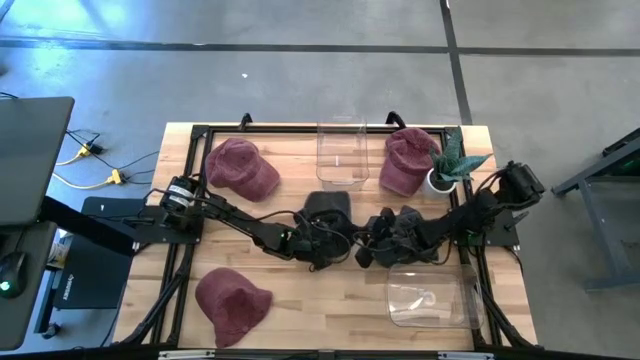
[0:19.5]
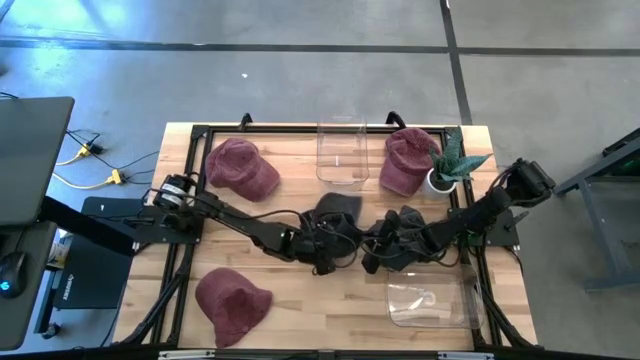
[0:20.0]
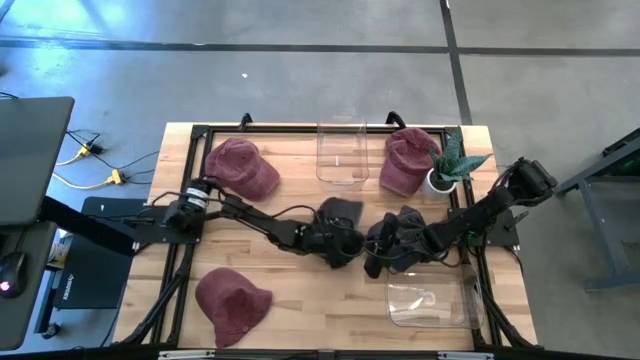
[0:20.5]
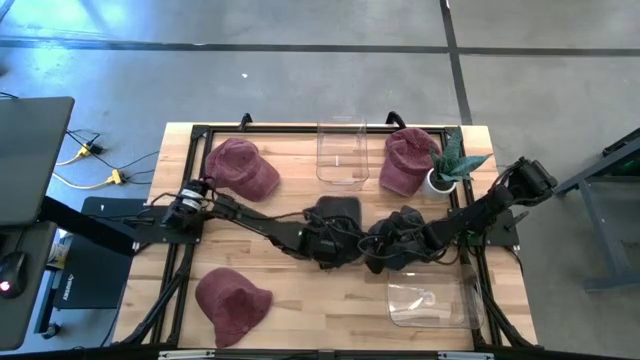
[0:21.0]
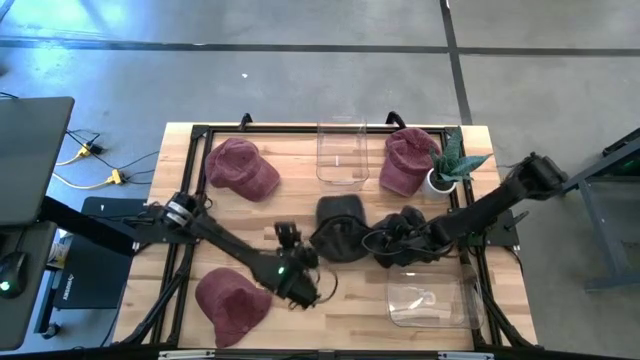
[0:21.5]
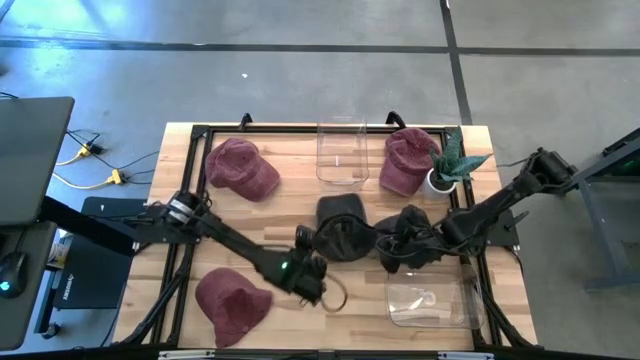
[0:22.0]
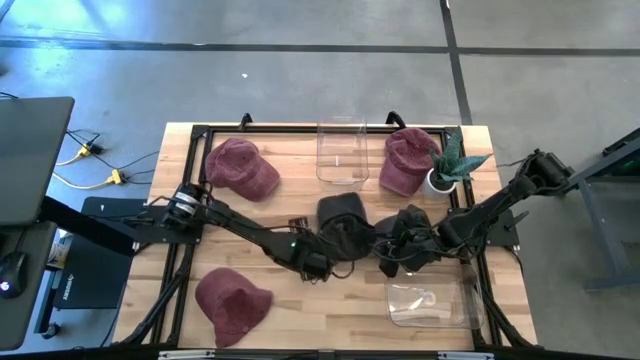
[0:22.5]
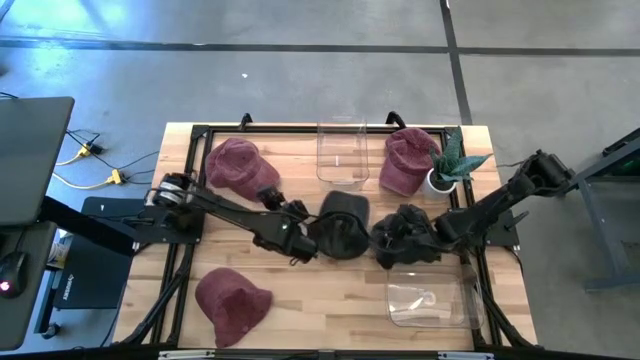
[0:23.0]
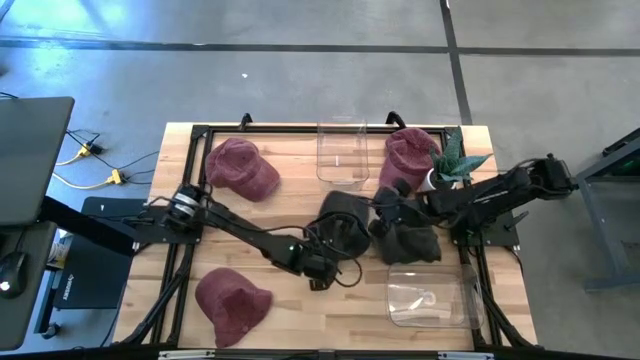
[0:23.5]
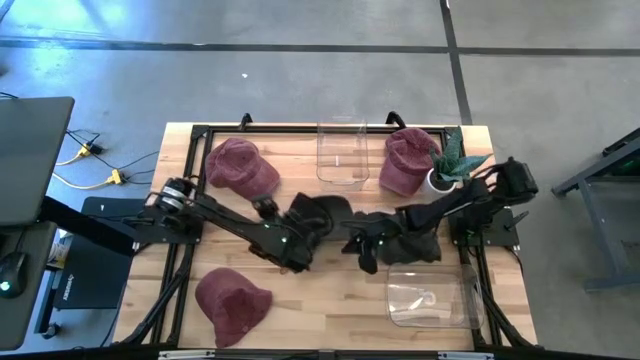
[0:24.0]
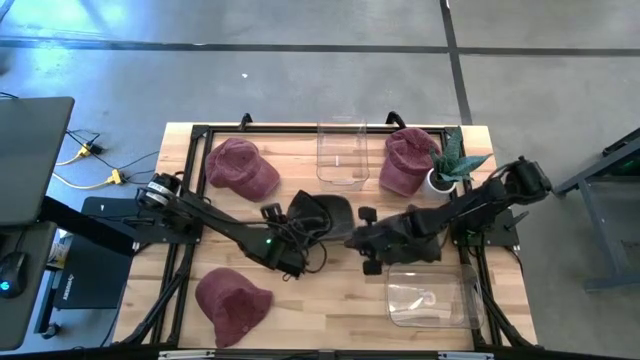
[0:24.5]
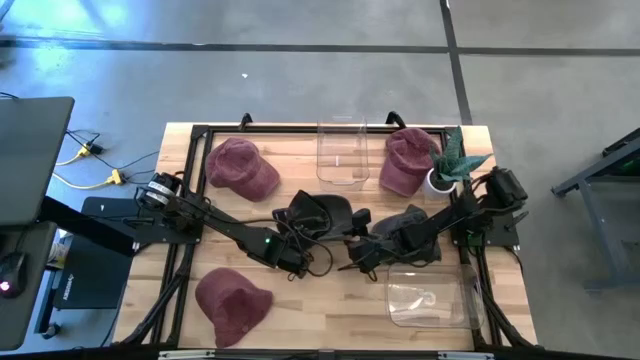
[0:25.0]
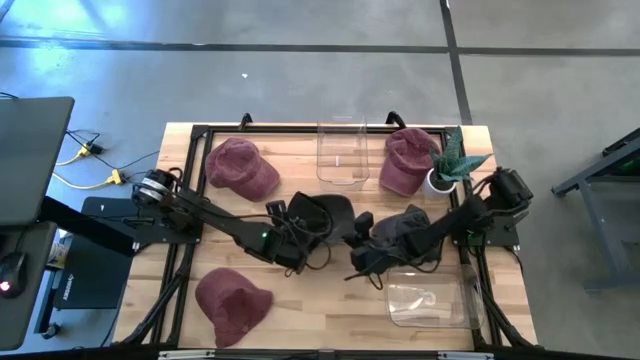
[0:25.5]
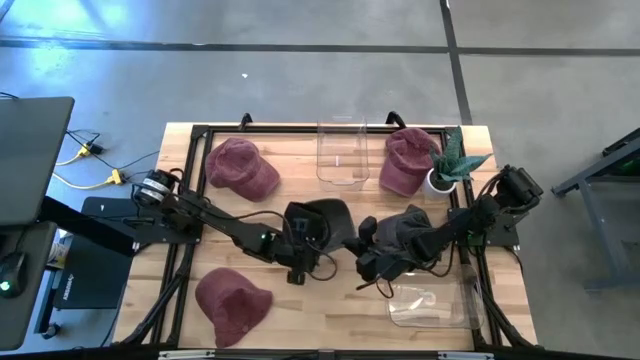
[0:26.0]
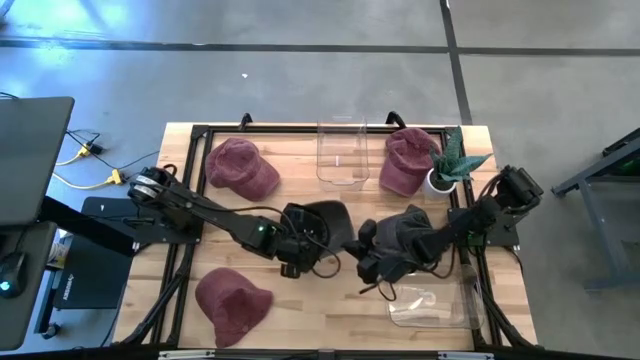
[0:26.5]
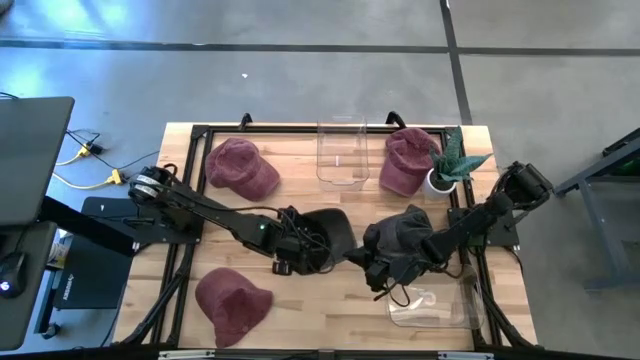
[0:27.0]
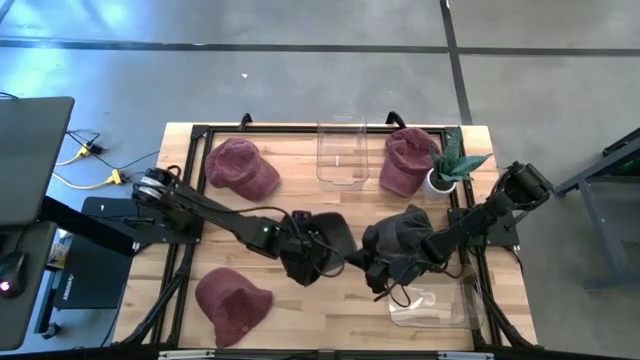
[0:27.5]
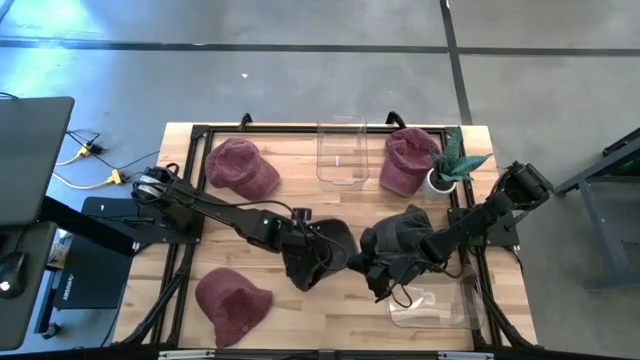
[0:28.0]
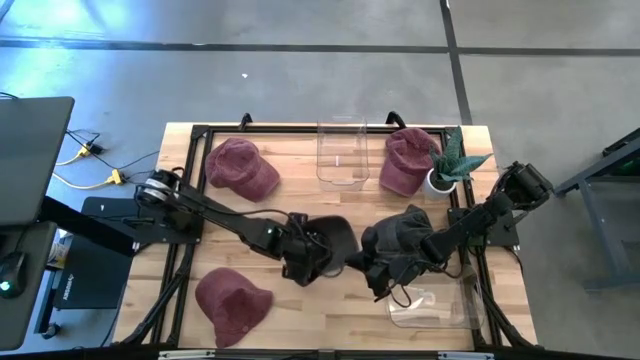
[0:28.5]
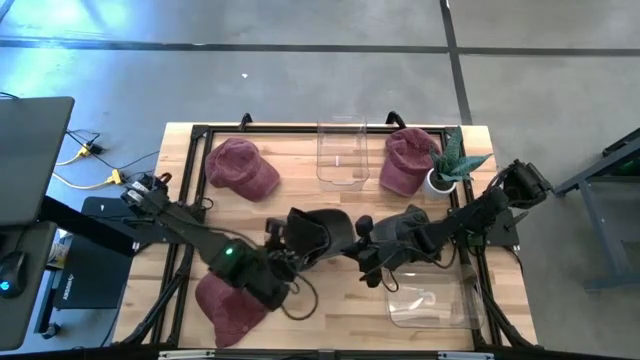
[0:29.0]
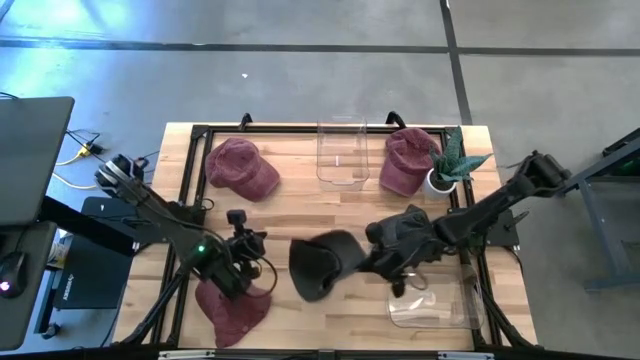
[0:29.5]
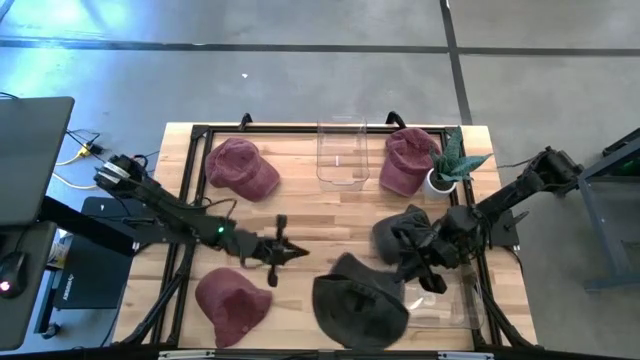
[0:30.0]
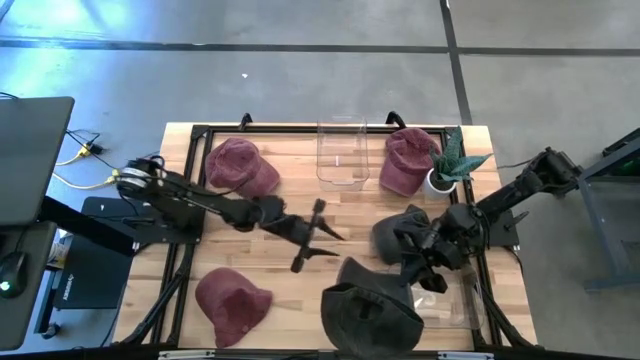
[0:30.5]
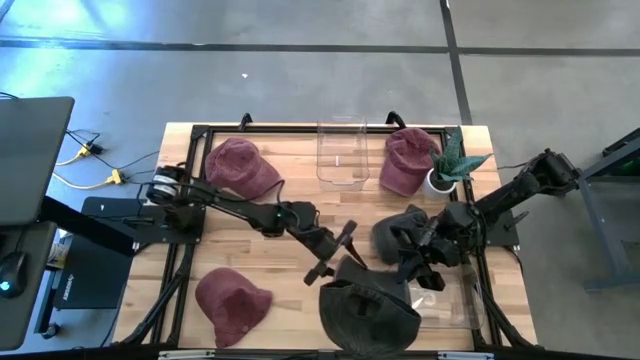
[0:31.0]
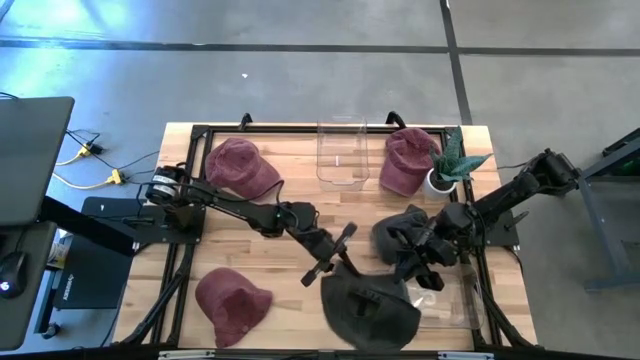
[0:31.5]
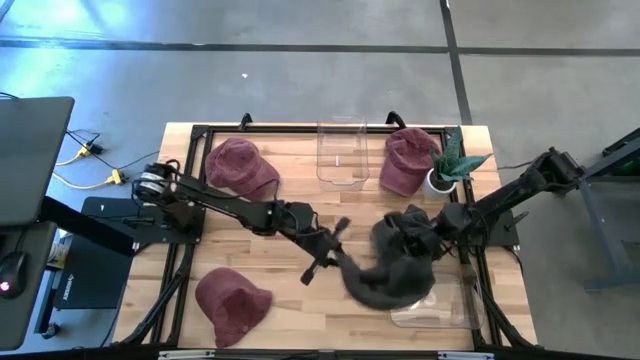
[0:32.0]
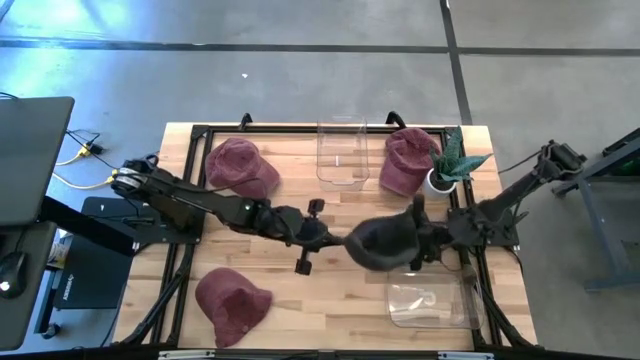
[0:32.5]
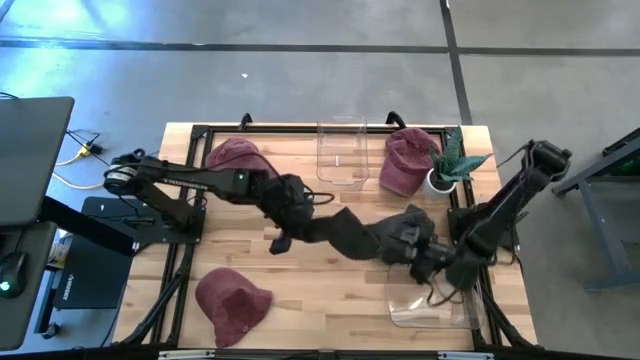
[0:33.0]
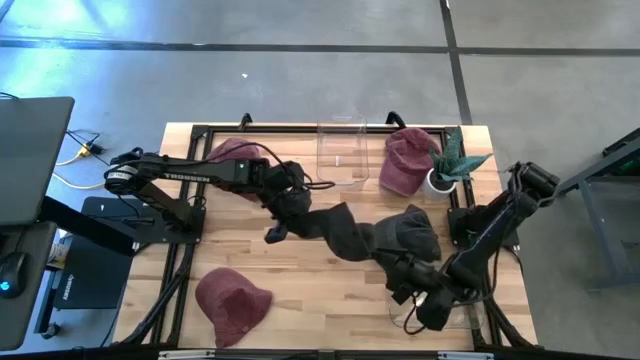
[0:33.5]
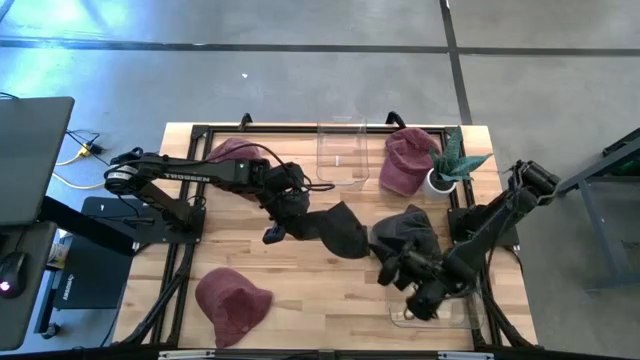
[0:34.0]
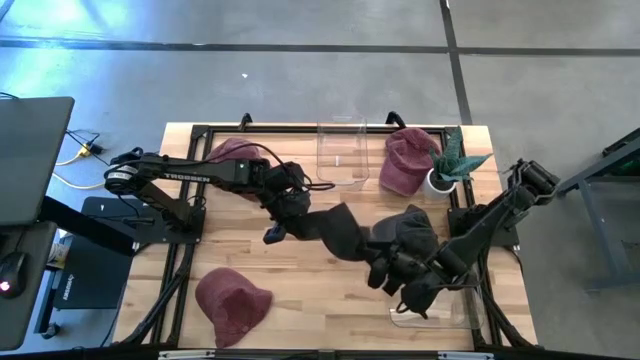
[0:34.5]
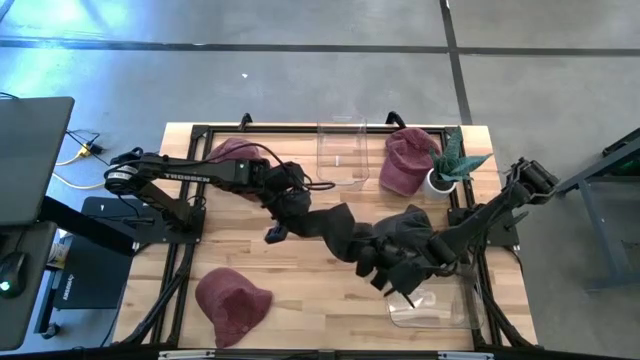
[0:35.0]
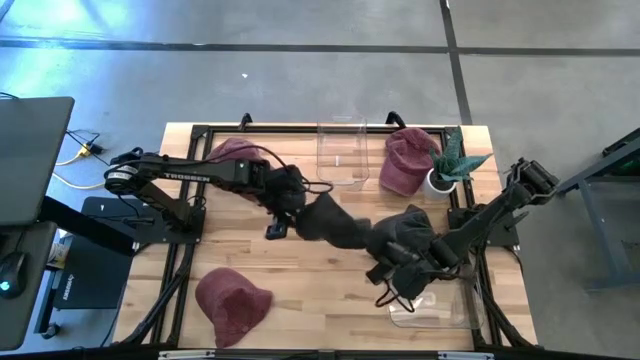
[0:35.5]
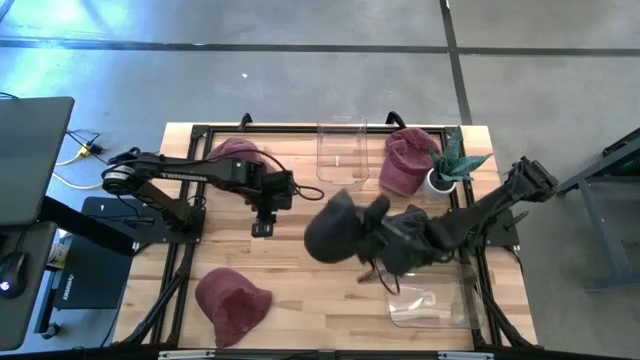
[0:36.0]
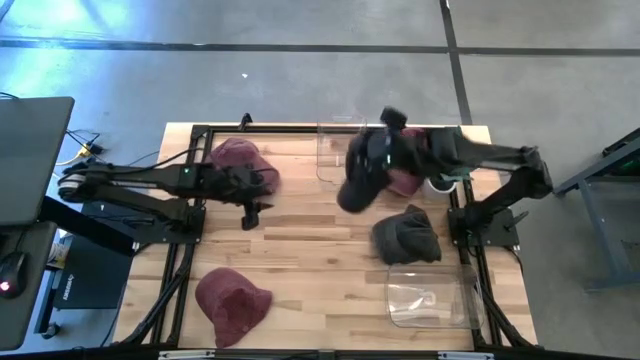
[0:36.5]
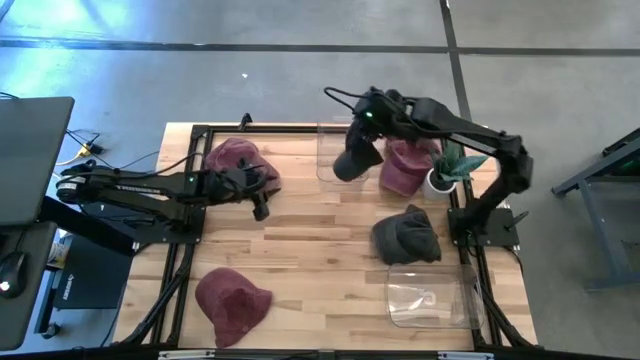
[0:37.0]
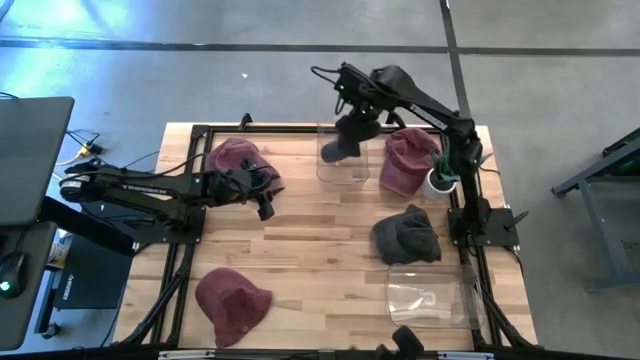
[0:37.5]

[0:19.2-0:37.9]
Task: Pick & Place hat
Put the left black cap into the top transparent bin

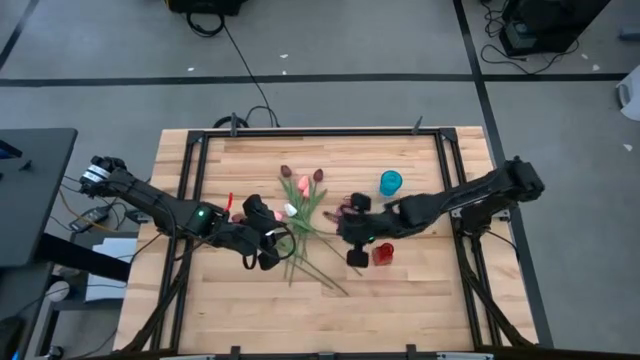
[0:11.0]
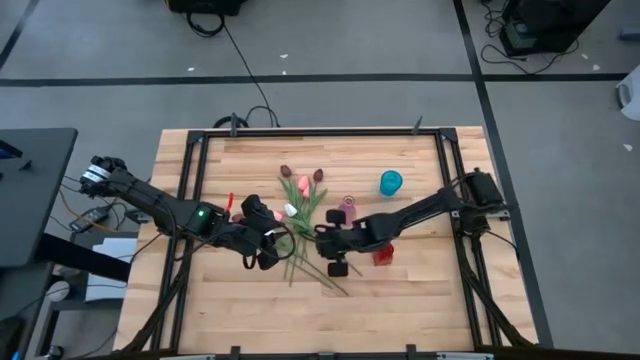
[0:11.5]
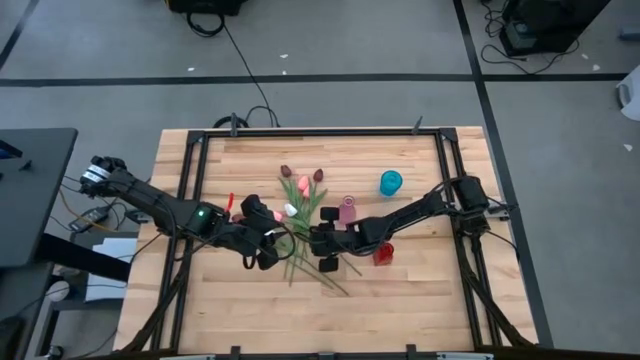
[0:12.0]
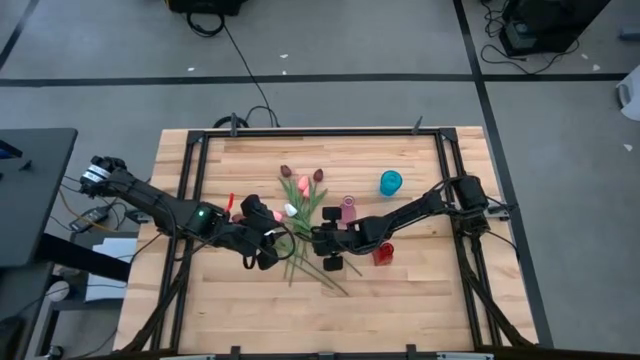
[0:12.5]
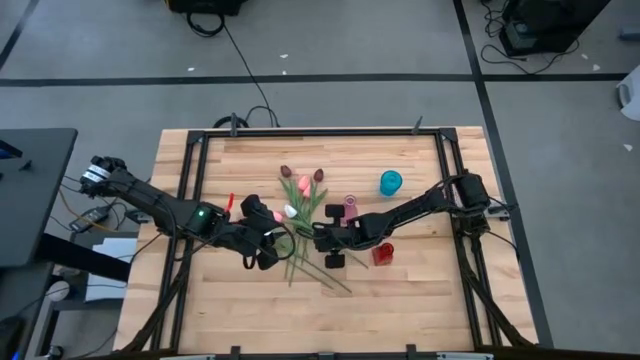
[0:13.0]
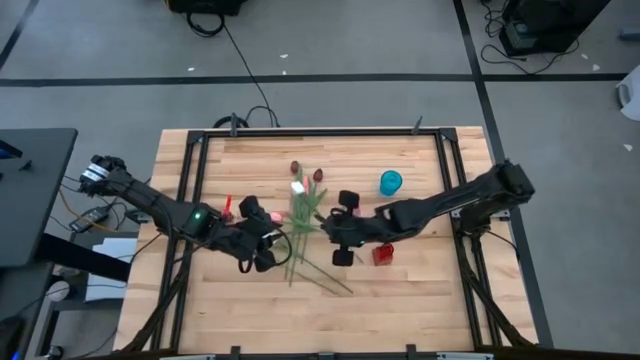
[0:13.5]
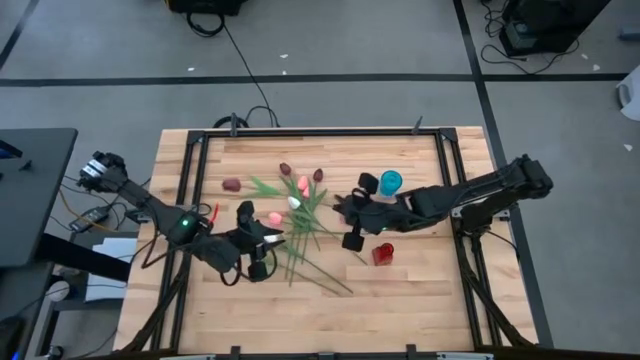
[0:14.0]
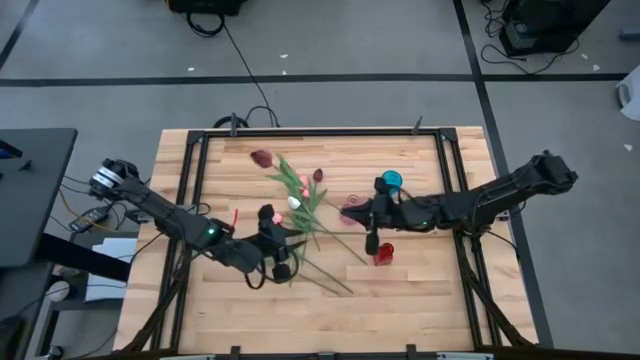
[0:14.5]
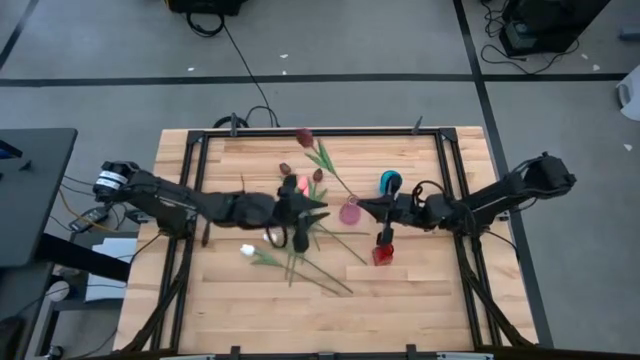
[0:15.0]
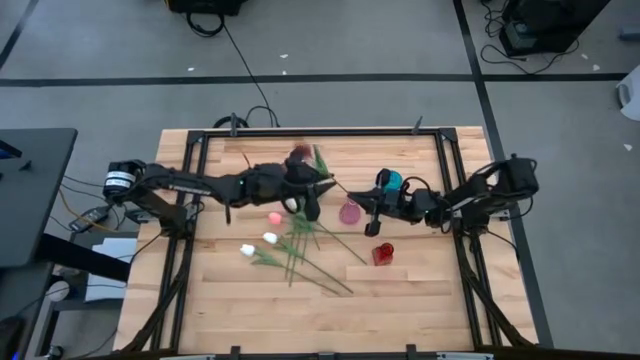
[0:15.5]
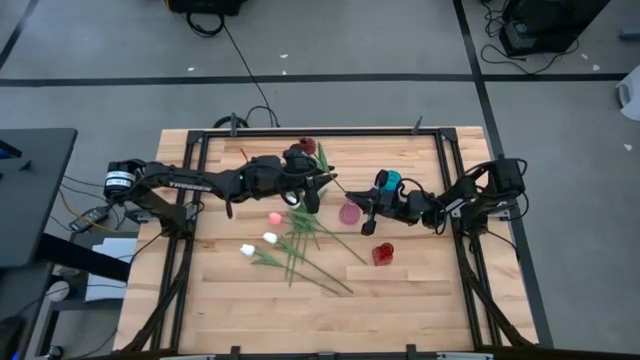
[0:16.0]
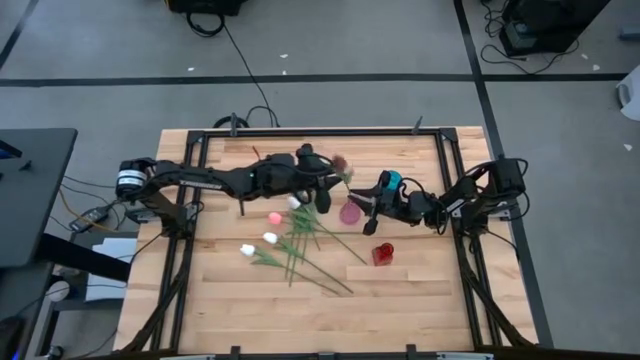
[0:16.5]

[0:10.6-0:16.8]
Task: Sort flowers into vase by color
Put the red flowers into the purple vase
